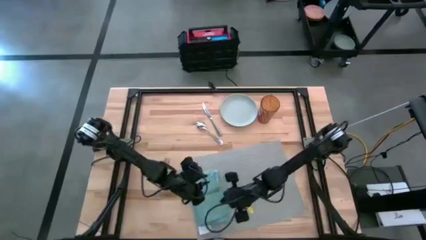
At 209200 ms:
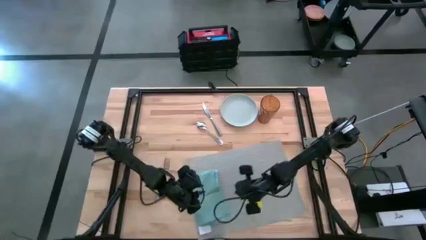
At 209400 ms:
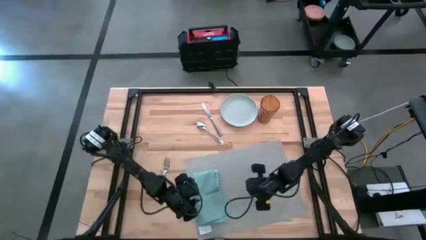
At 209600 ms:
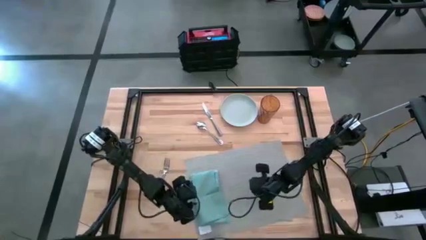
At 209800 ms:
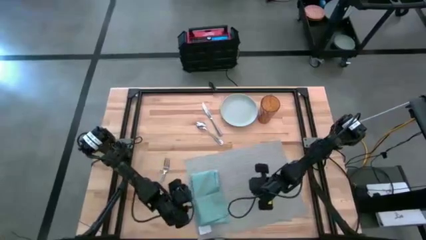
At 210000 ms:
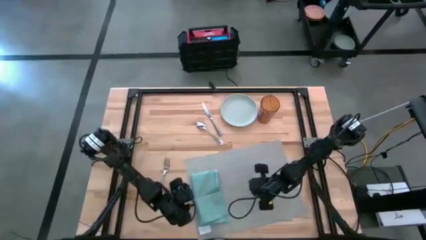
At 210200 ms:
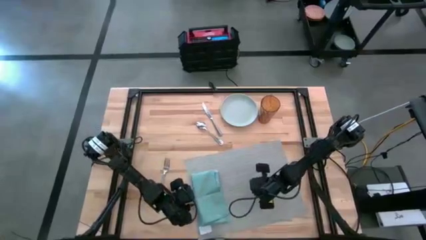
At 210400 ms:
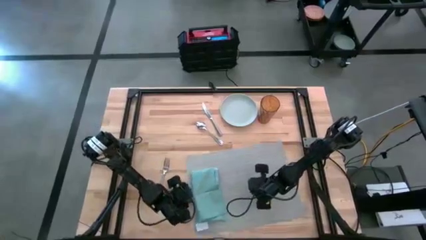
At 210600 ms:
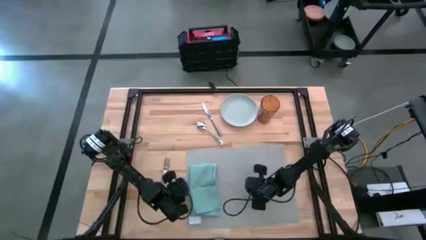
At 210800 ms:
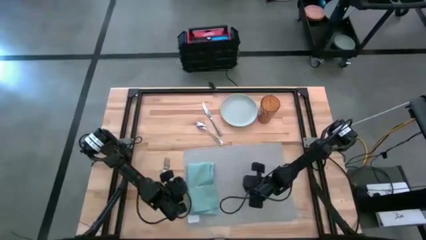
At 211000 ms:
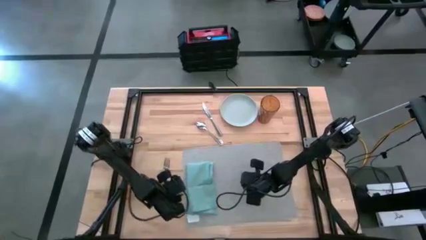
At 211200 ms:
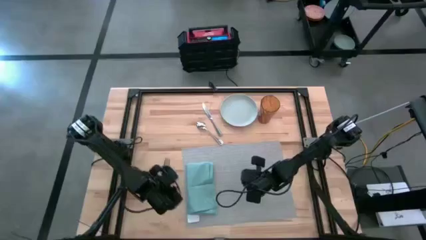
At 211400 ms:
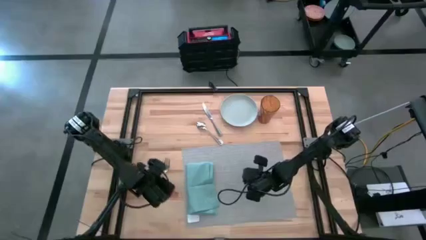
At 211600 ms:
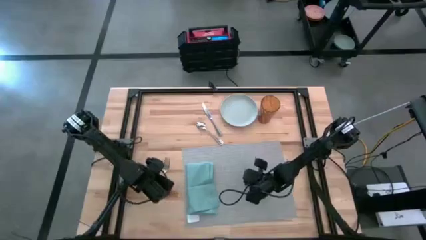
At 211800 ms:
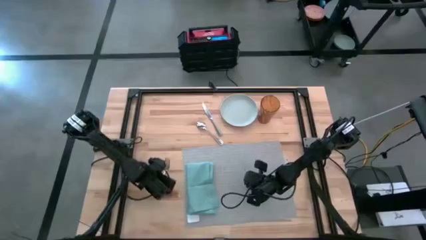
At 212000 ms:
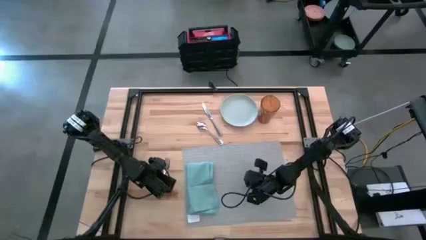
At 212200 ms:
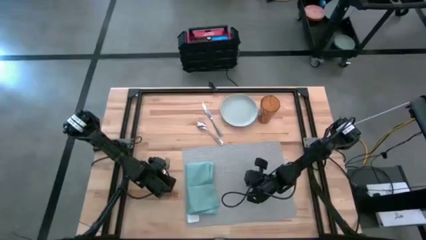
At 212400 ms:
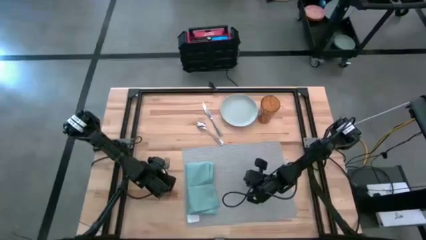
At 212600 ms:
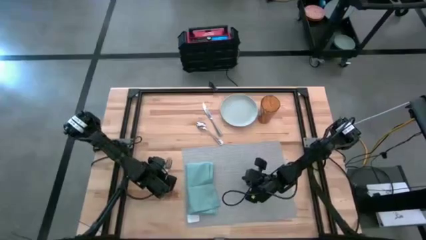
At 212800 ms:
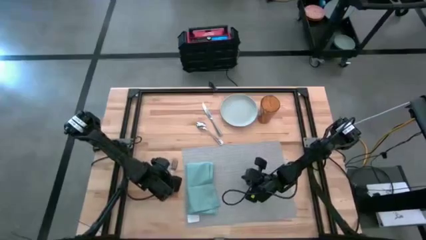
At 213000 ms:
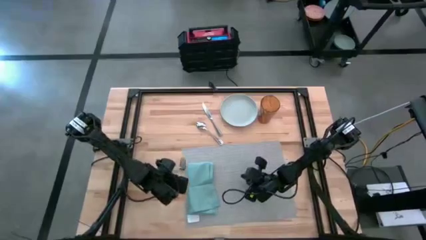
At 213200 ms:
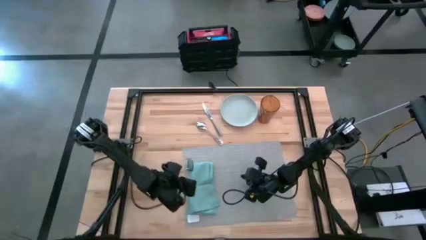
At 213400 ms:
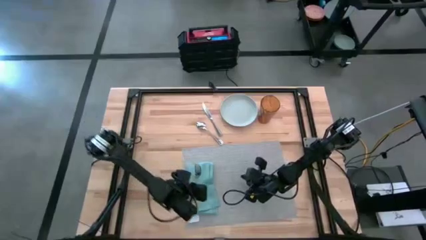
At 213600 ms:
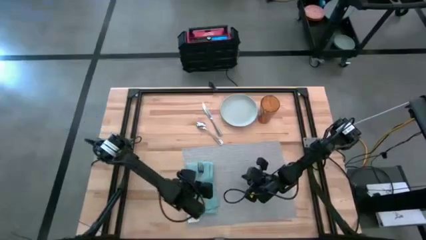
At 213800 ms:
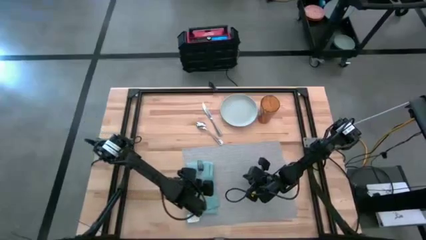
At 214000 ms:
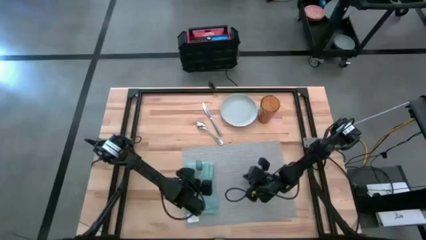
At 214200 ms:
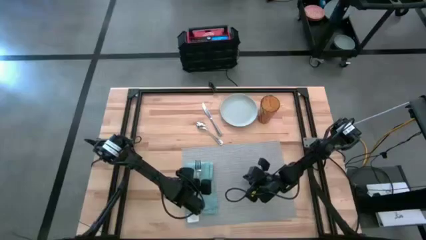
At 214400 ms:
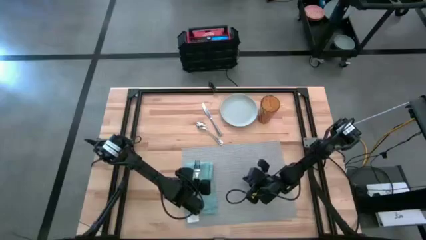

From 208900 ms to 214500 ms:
Task: Set table place
Put the silver fork on the blue napkin

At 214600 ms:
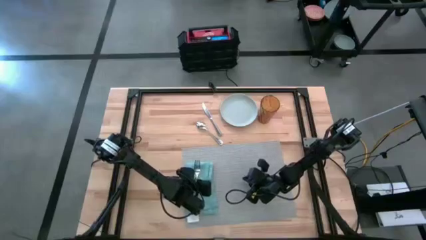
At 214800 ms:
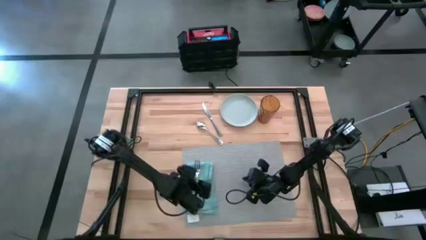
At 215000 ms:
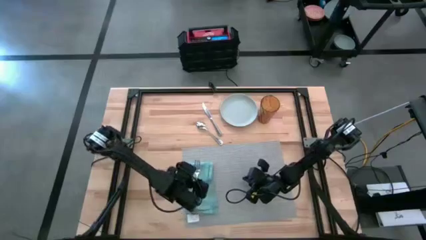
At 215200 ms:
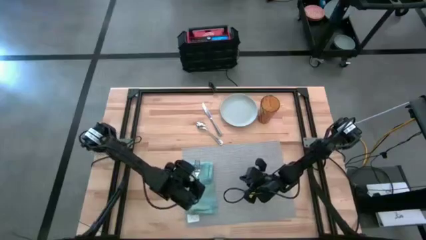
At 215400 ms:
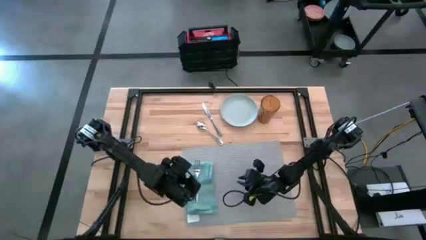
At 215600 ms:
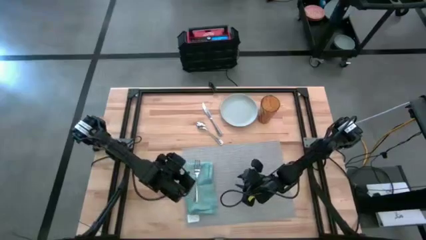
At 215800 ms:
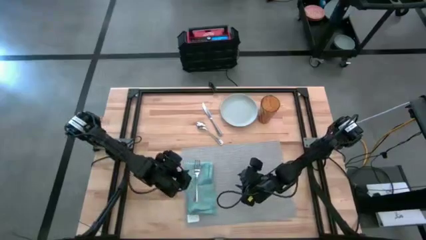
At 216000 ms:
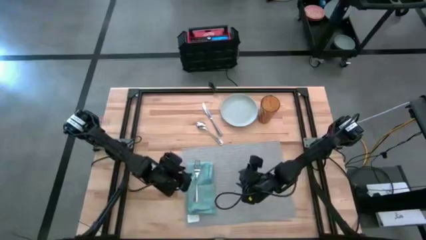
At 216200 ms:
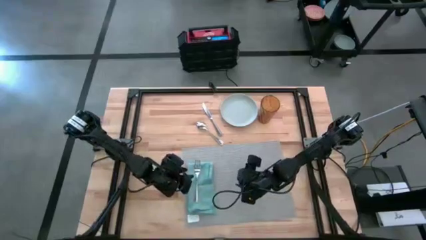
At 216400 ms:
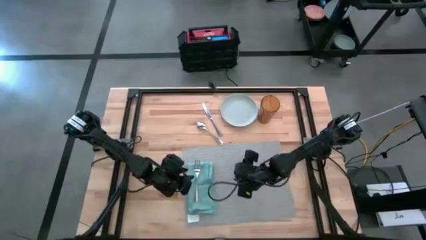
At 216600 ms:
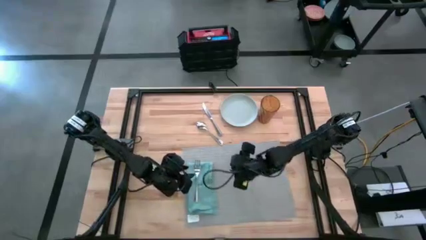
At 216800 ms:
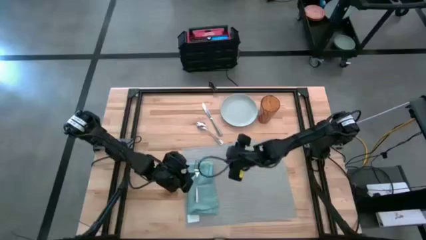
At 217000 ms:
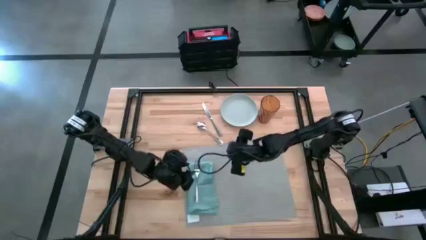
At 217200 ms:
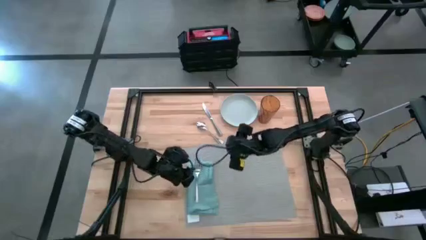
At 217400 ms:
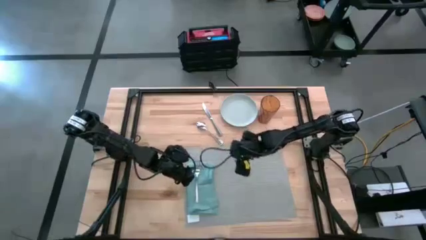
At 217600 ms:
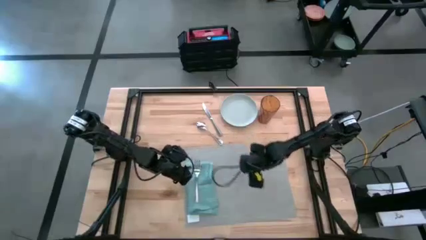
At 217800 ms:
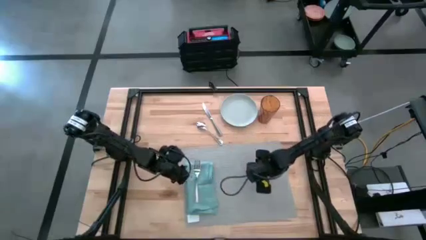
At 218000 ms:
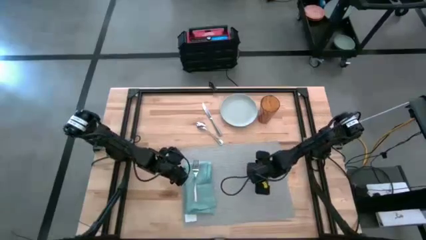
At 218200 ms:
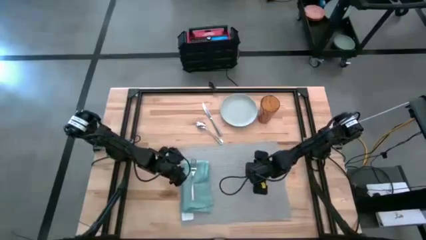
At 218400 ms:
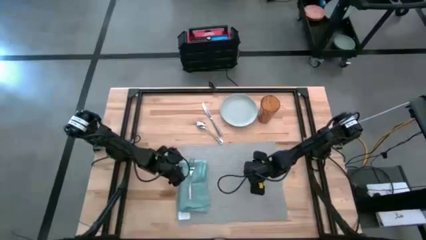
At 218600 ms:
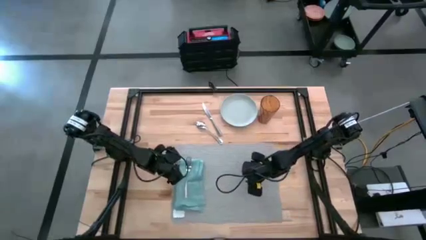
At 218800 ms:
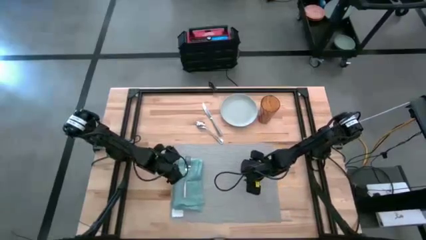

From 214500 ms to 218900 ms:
Adjust the gray placemat

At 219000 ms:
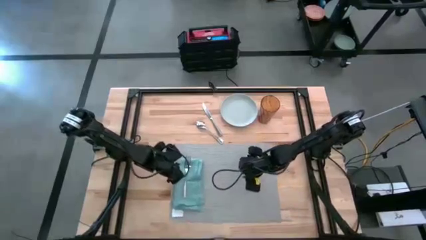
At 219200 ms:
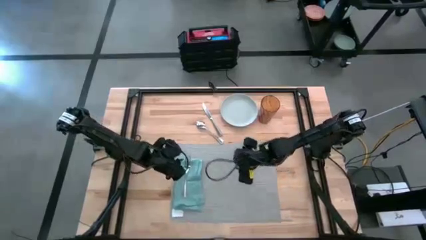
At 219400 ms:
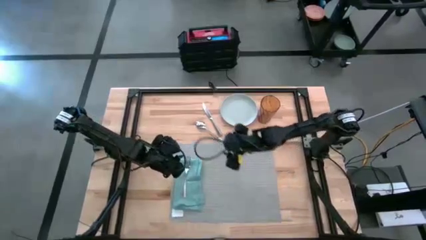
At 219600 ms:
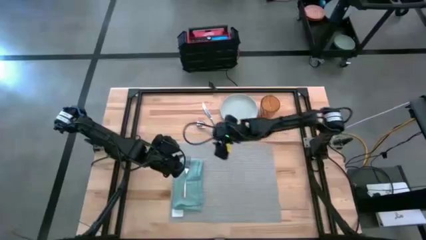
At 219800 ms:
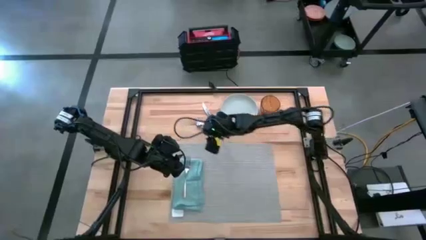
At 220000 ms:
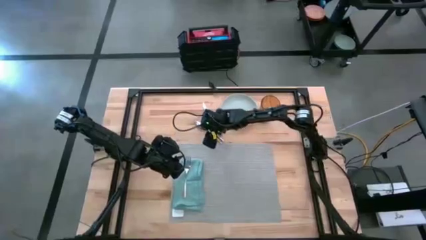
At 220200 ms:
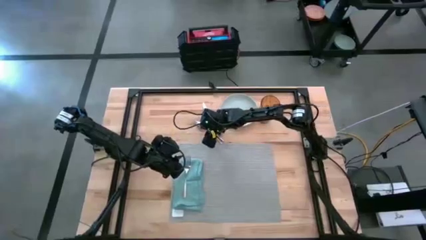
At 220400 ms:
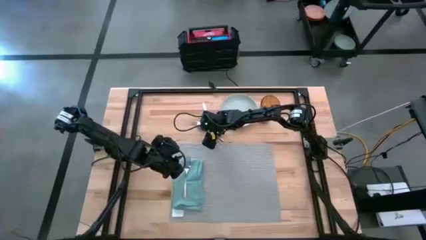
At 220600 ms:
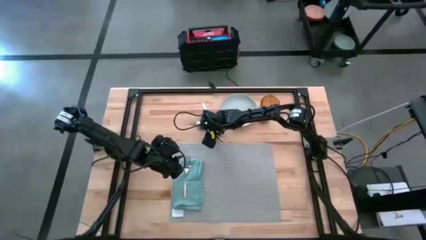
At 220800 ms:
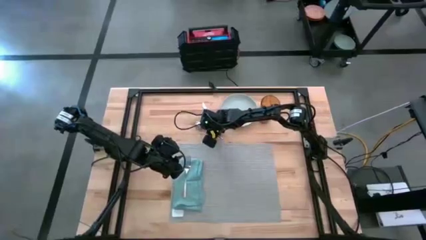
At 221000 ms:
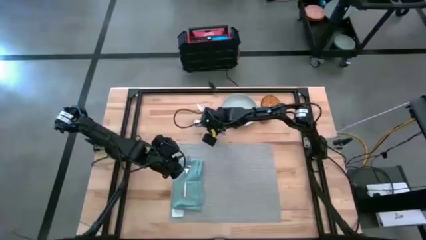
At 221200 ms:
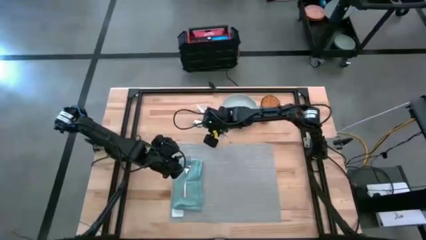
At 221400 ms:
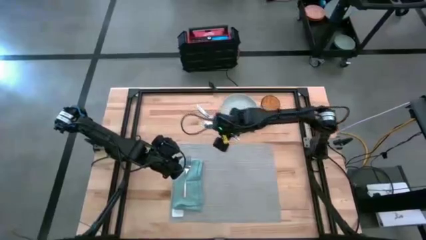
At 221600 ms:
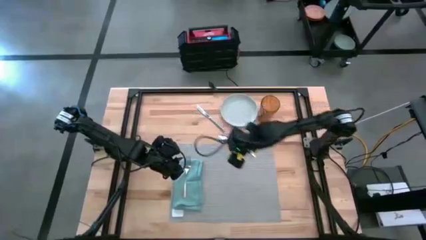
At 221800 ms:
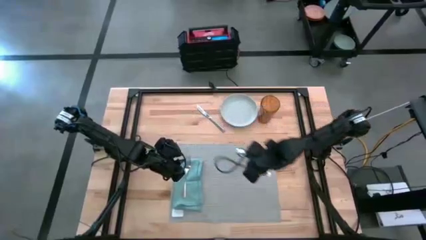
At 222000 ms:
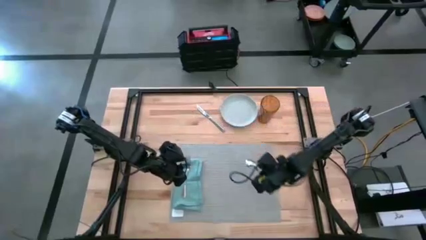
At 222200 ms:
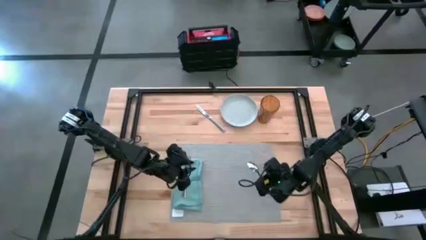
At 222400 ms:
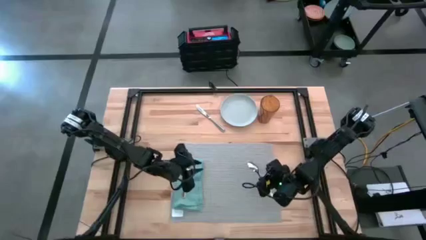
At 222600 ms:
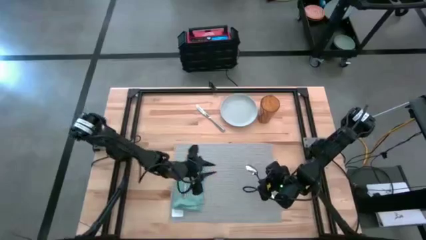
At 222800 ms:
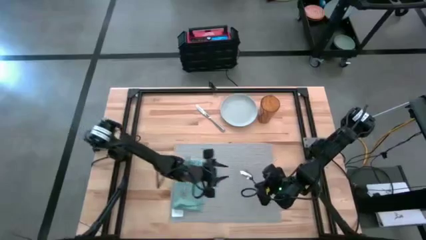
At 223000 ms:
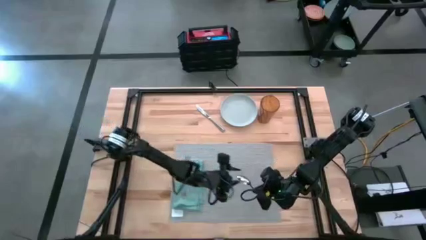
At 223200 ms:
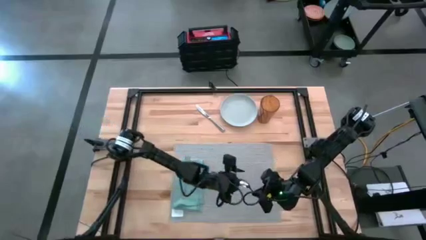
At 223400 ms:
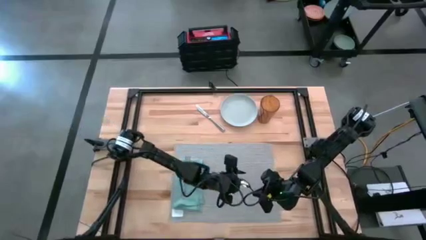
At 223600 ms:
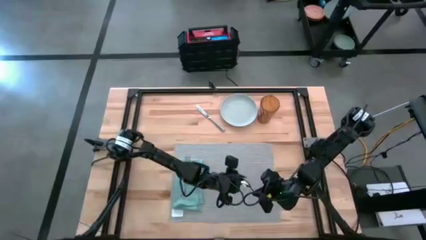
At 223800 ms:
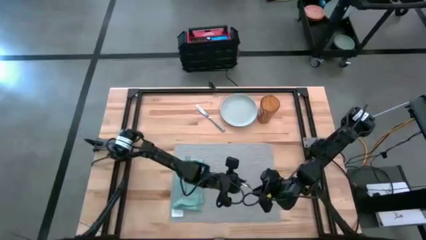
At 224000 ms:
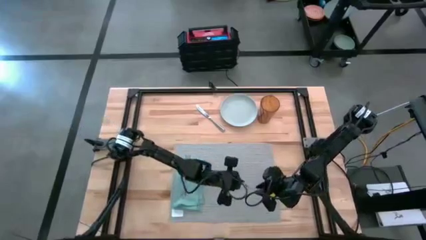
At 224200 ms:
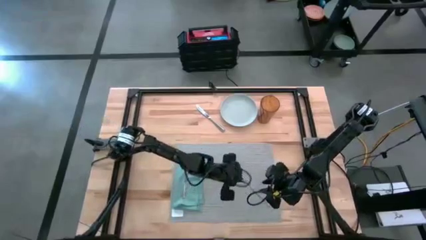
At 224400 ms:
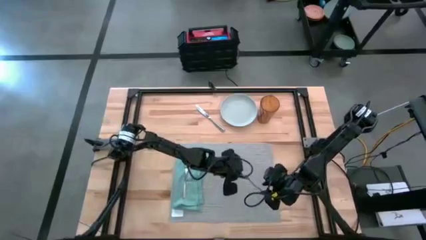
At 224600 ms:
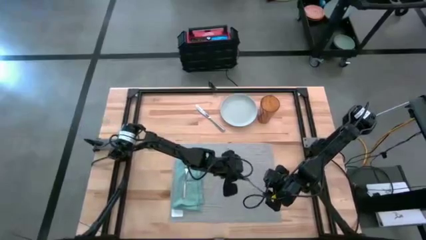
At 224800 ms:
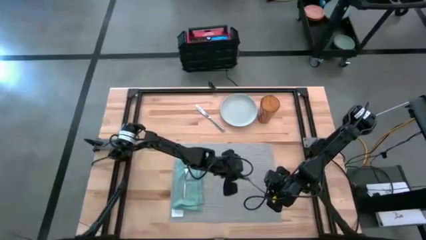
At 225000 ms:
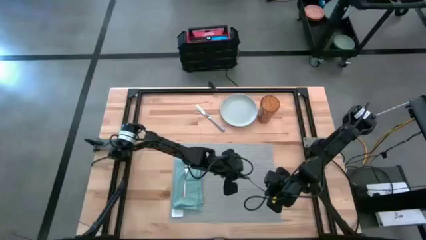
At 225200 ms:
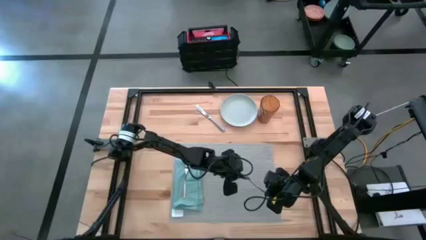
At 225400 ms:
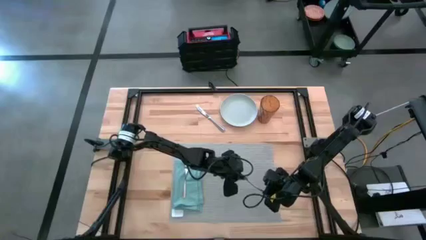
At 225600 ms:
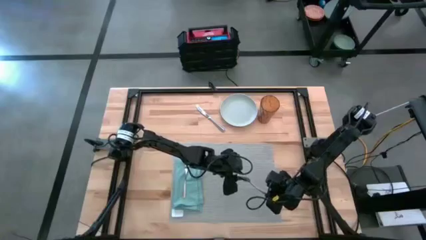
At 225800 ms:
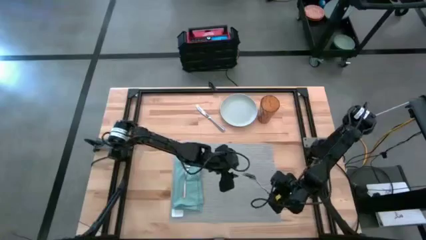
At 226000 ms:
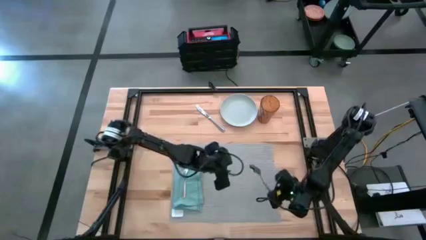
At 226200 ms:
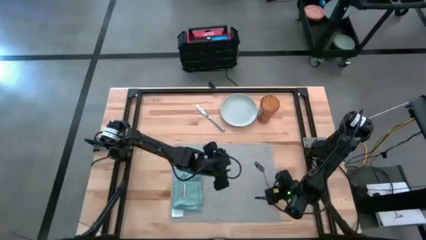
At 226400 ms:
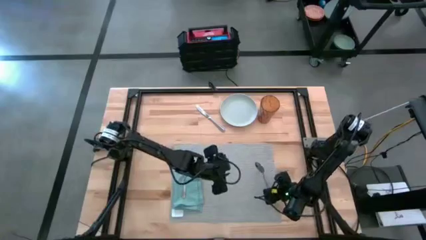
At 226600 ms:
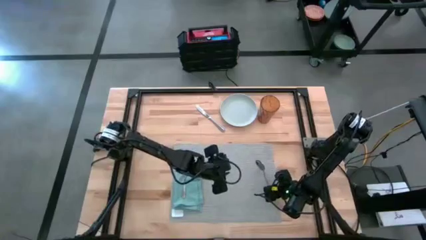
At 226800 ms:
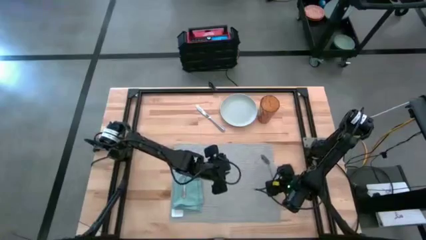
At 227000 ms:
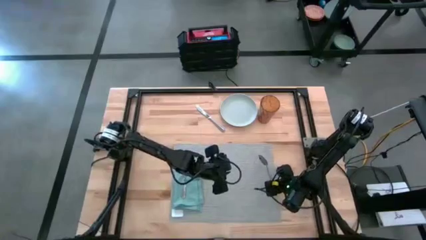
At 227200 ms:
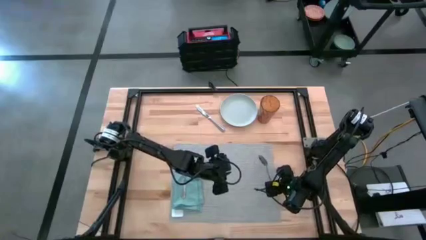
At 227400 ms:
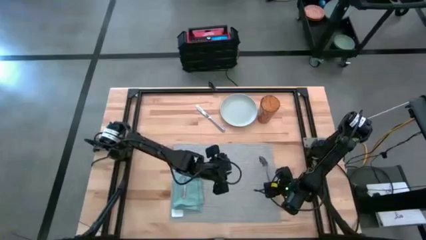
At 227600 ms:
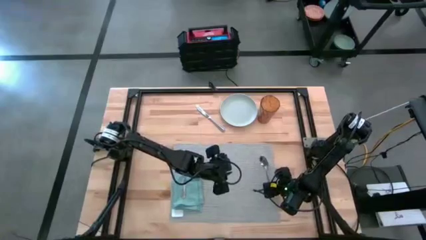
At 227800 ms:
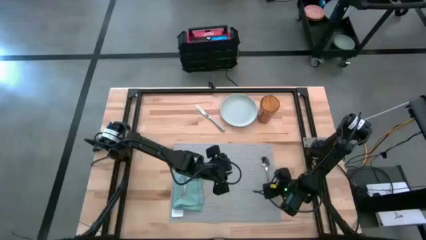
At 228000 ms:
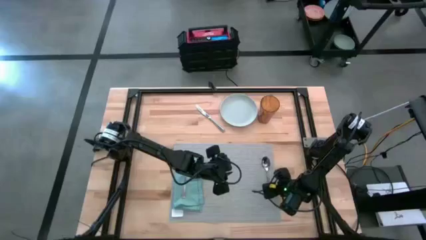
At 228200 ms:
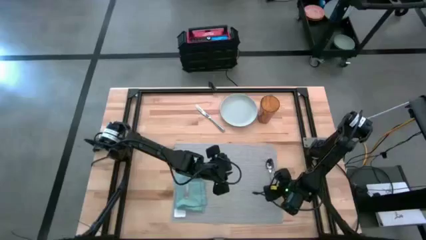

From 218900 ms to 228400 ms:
Put the silver spoon on the gray placemat
